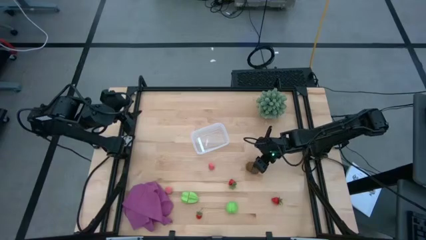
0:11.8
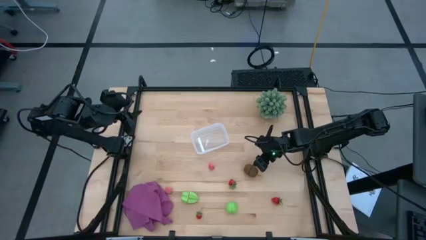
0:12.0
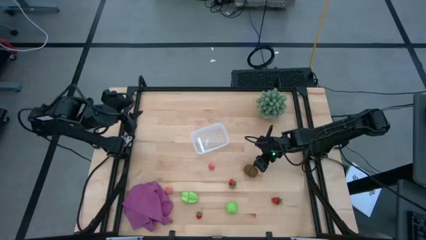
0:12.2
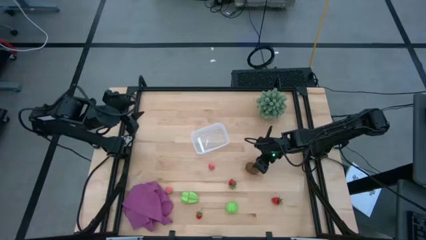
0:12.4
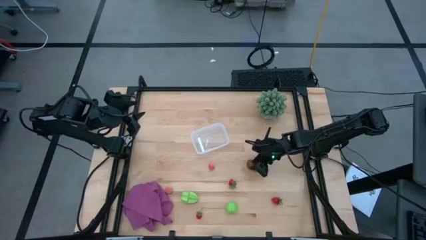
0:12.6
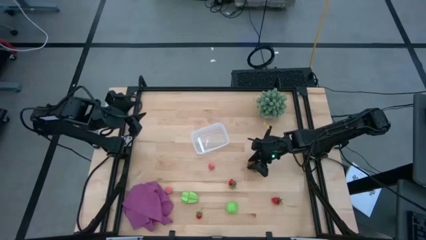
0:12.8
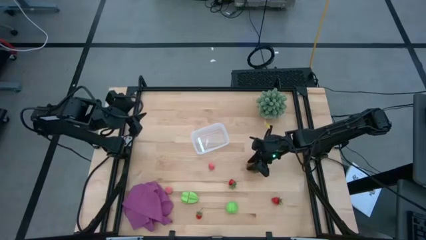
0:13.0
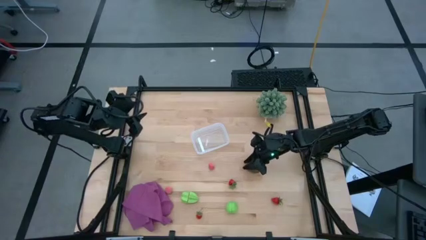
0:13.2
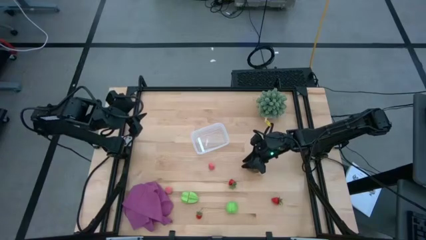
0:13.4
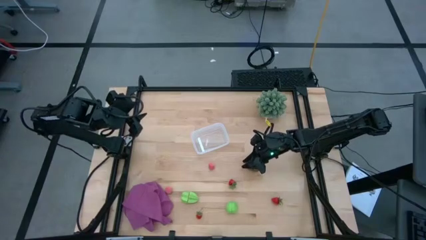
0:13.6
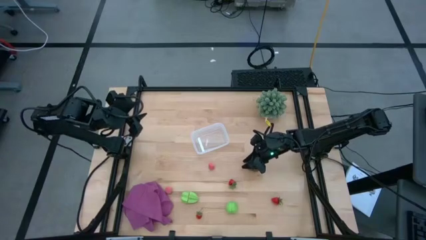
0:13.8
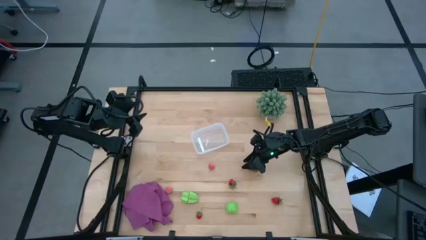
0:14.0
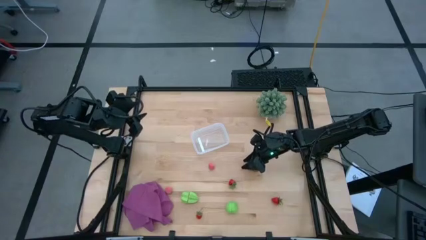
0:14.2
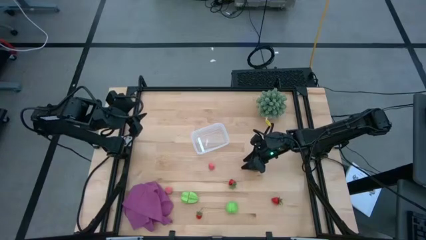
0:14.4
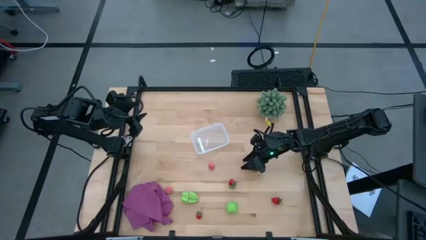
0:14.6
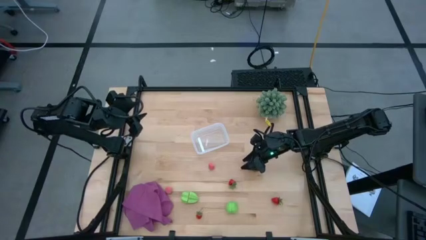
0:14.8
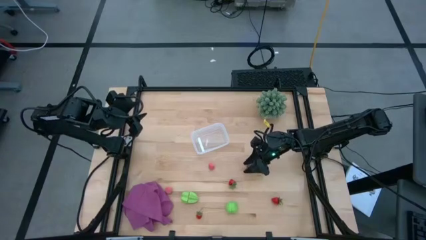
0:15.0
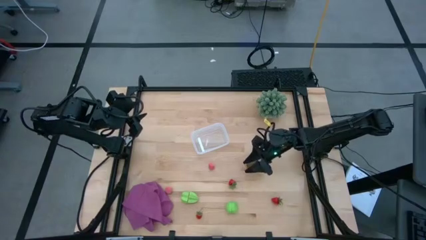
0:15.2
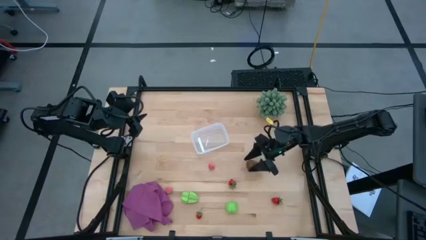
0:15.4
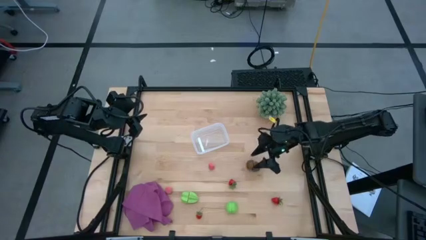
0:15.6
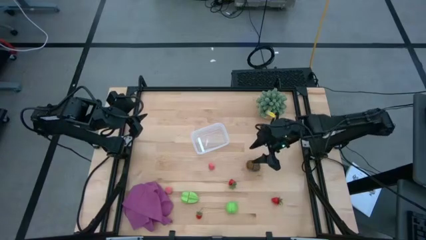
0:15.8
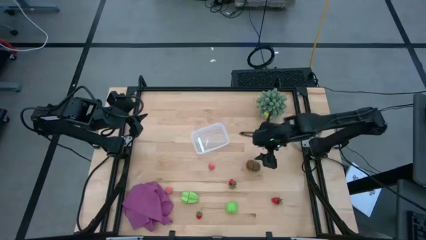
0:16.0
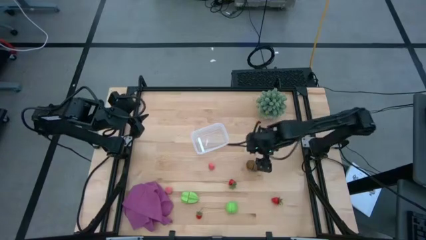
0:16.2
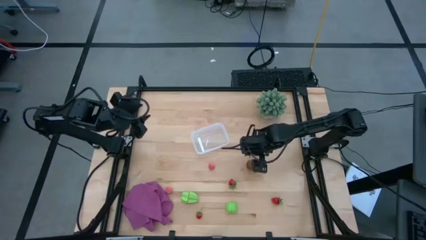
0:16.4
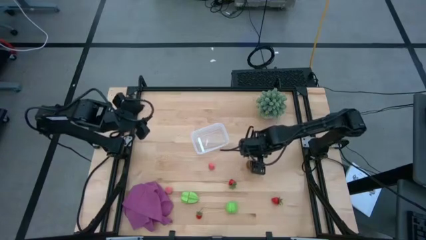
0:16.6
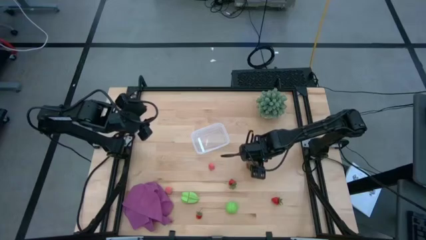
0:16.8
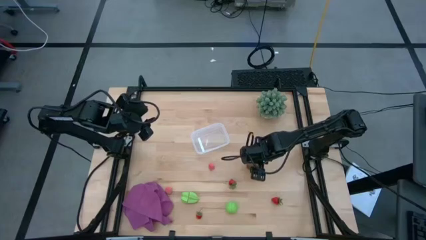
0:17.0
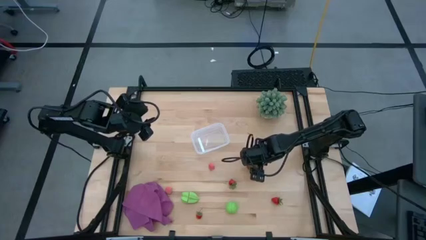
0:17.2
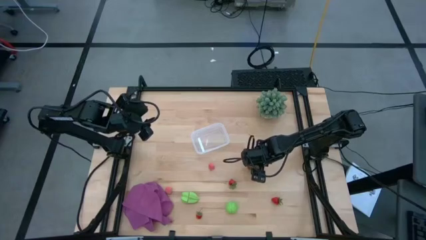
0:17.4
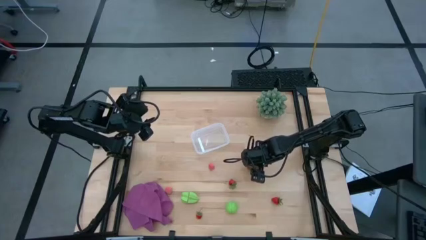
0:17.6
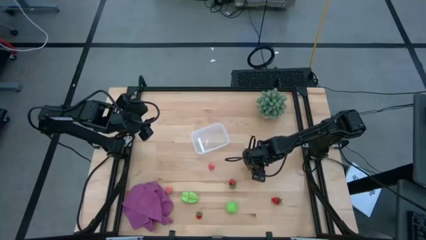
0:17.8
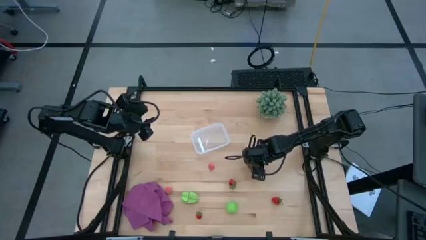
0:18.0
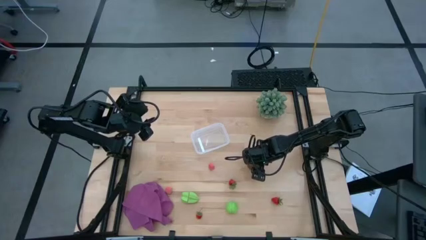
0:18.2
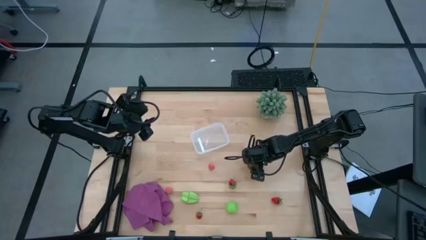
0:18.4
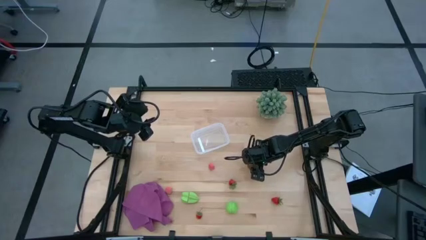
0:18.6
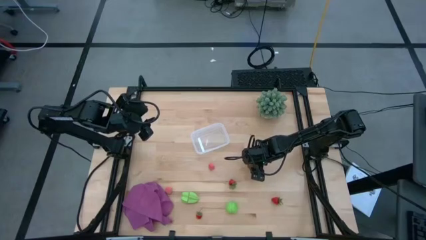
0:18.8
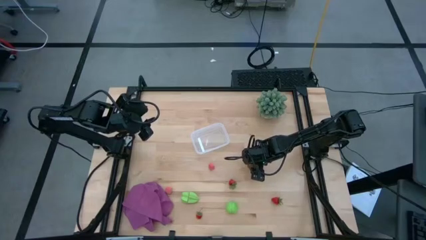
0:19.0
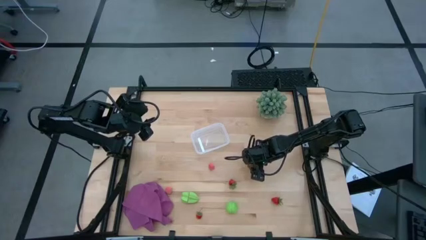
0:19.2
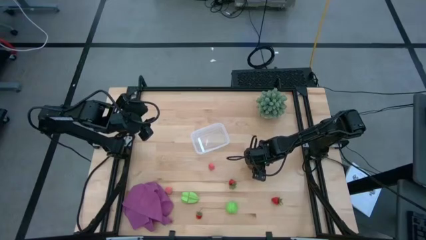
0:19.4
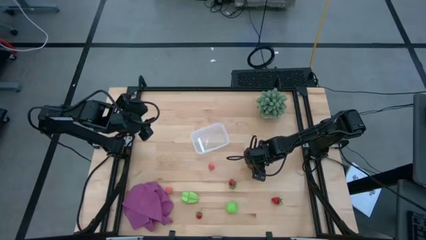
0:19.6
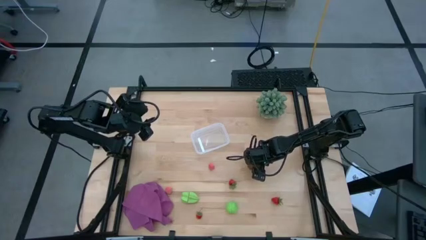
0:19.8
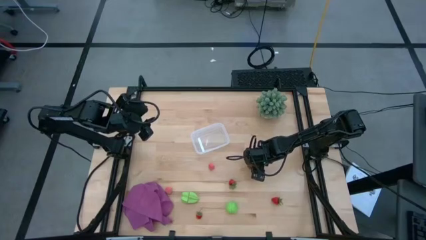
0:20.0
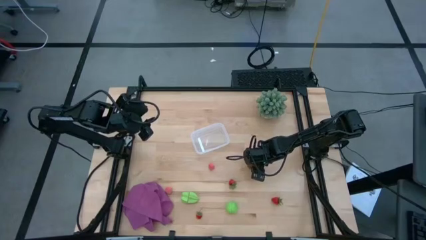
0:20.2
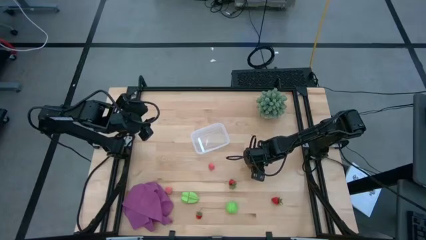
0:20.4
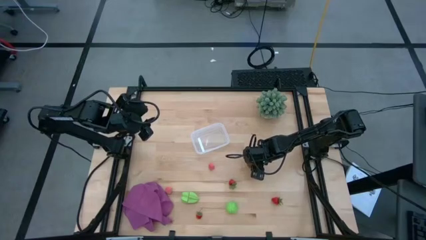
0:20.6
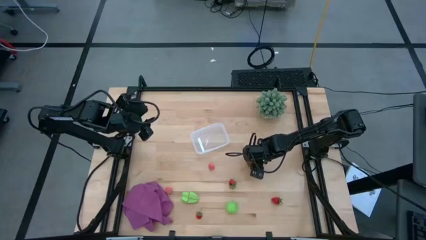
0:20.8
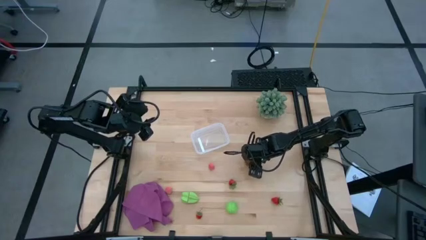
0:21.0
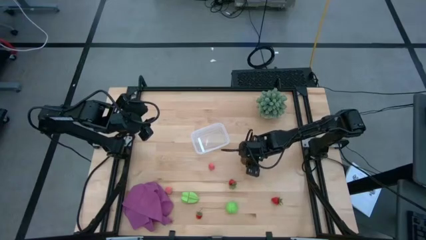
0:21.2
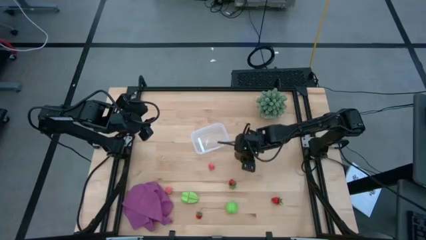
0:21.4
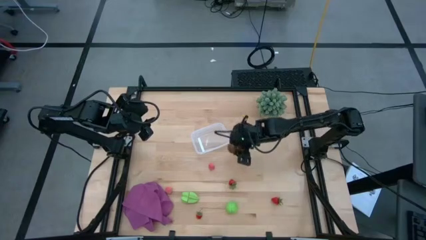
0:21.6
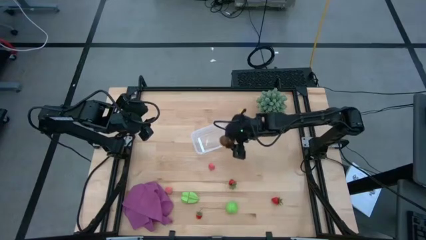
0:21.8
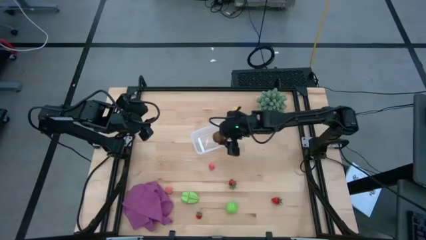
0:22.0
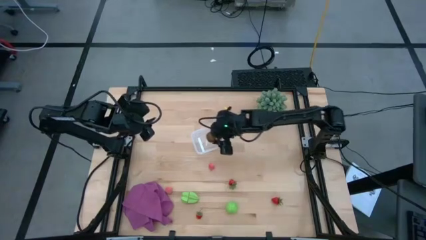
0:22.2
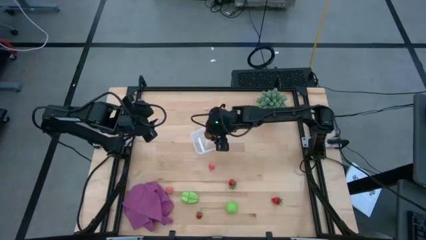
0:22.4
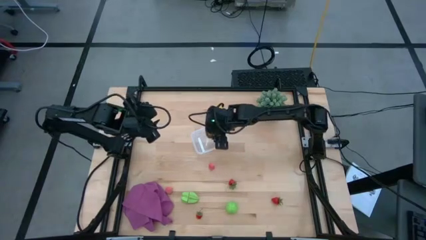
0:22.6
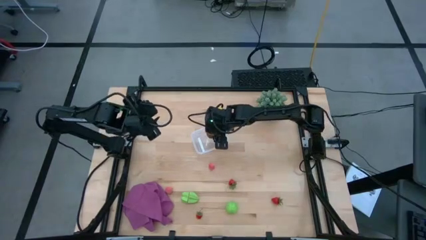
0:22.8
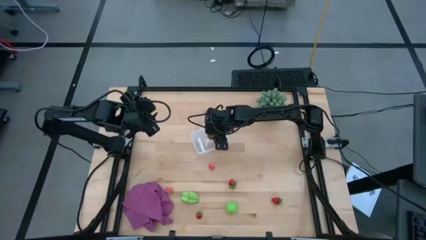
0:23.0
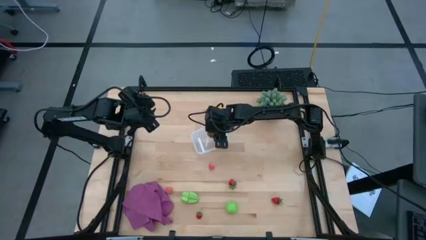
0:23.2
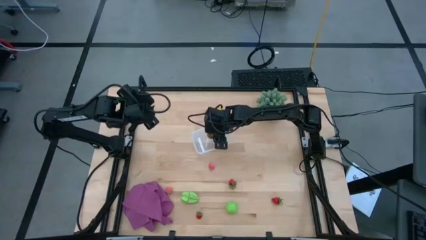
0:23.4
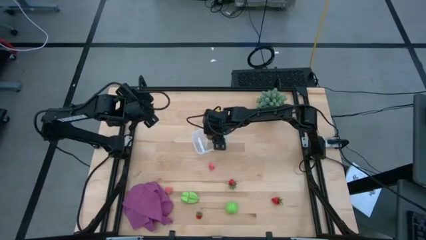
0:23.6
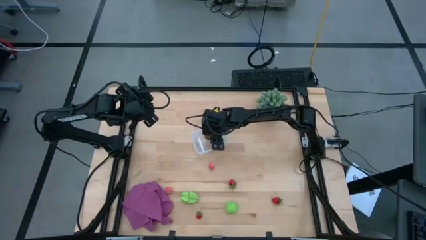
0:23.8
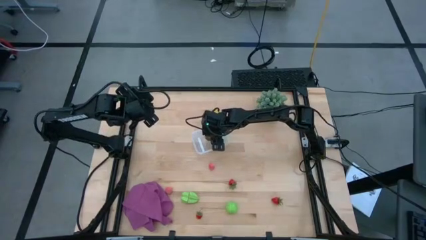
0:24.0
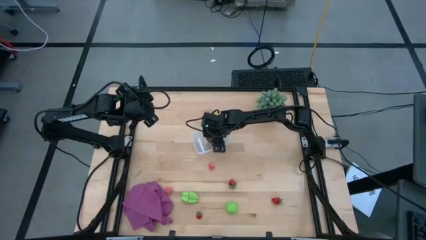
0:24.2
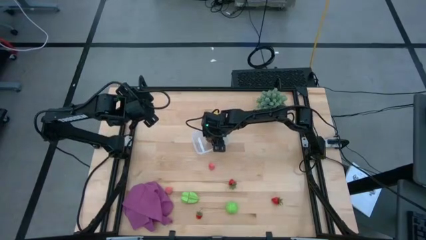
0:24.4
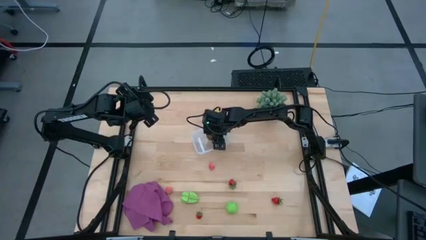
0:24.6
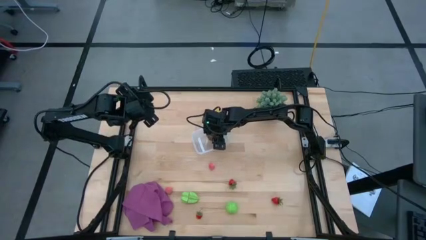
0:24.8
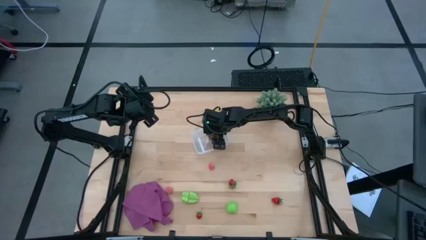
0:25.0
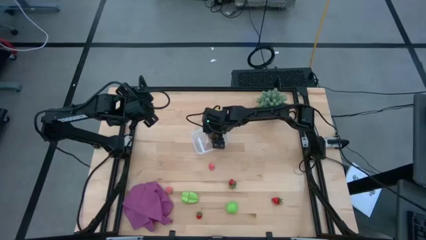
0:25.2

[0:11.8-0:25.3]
Task: Pick and placing Produce into tupperware
Put the brown kiwi into the transparent container

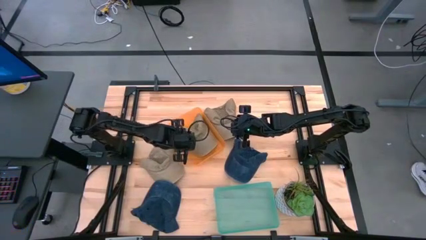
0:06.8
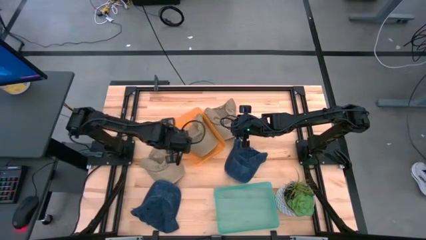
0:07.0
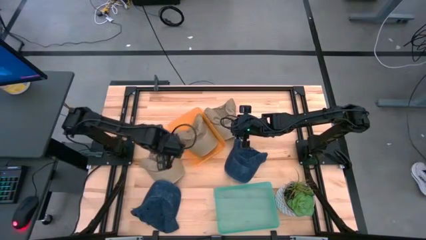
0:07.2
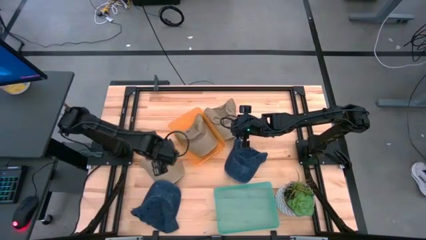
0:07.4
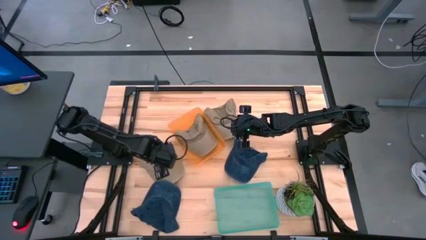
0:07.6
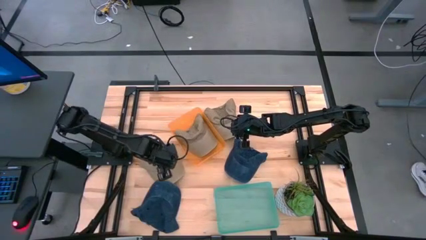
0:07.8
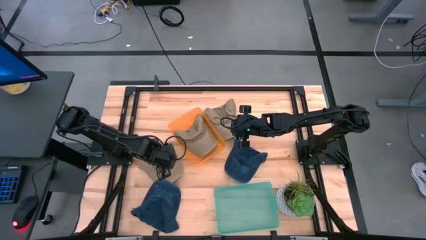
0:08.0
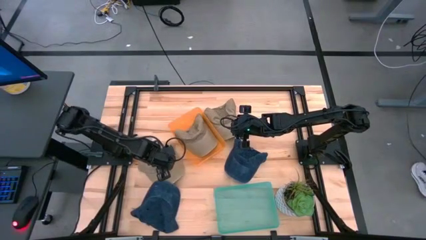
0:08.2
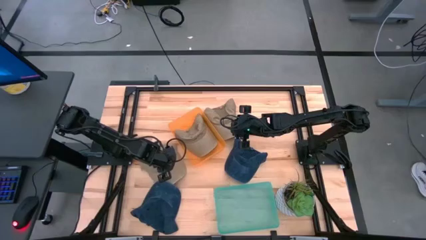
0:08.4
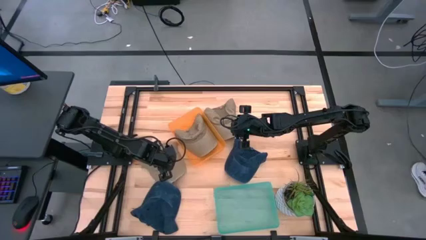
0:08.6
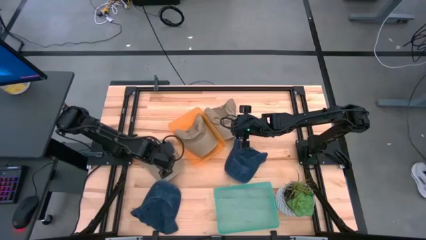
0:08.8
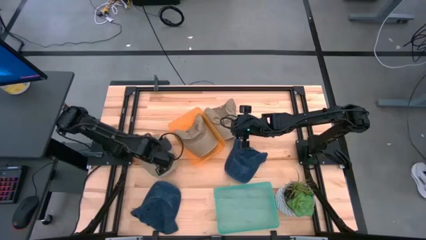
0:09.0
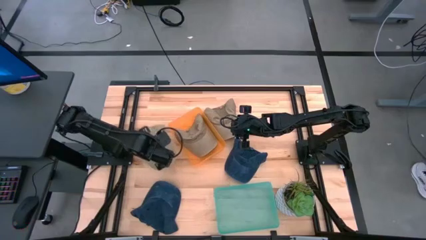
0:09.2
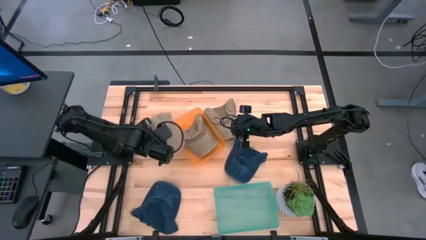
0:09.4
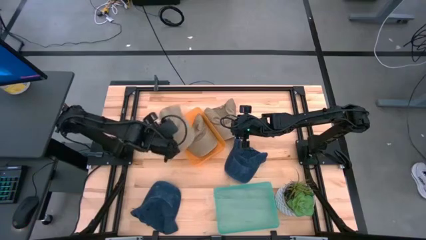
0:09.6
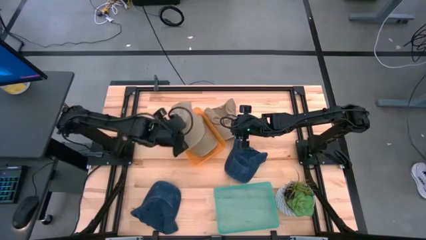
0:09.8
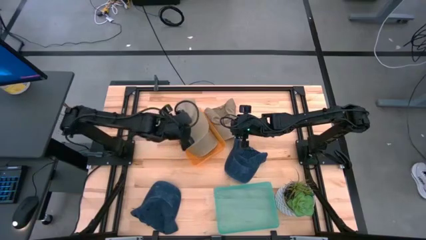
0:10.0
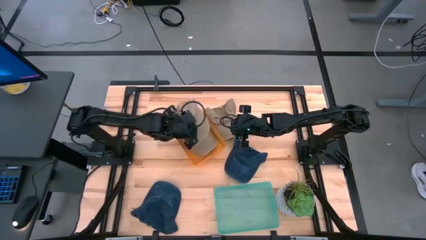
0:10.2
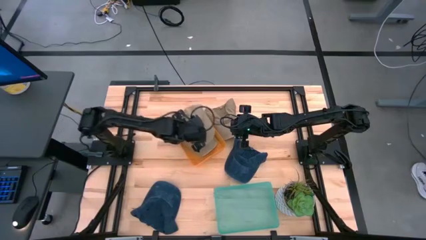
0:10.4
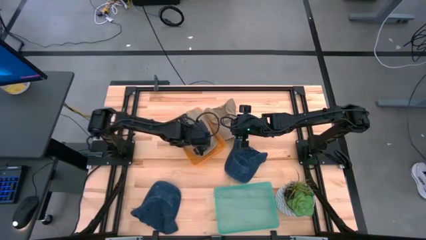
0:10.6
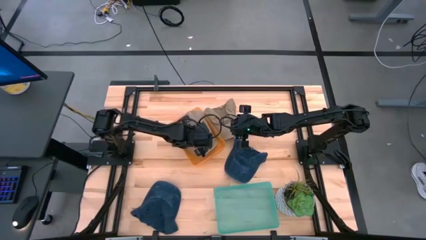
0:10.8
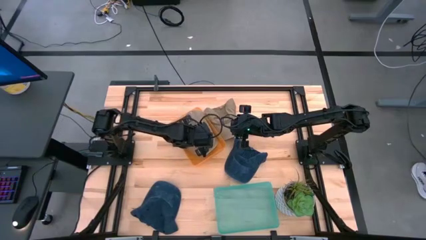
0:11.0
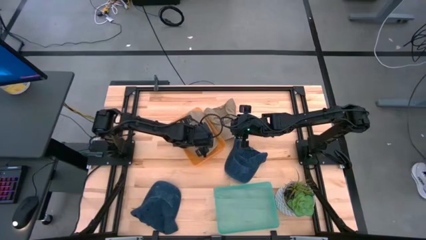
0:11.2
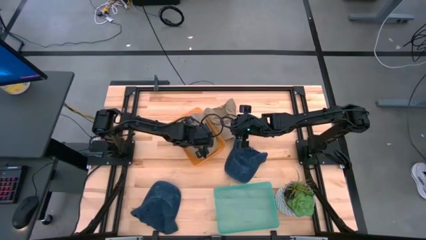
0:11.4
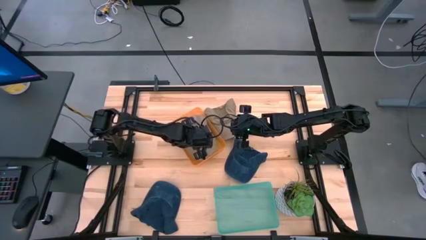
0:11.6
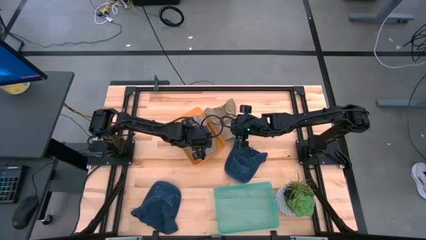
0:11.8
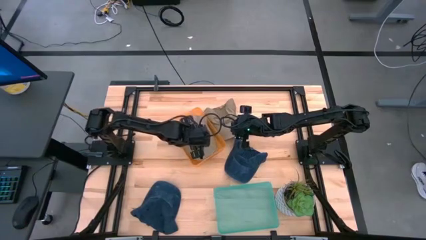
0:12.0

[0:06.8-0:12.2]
Task: Pick & Place hat
Put the left brown cap into the orange bin
